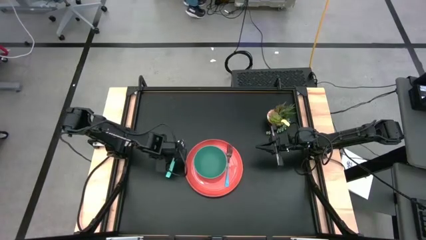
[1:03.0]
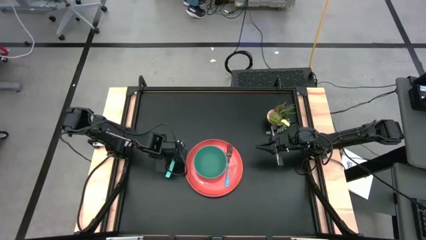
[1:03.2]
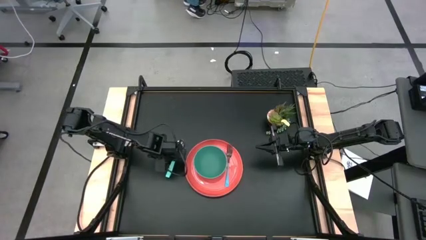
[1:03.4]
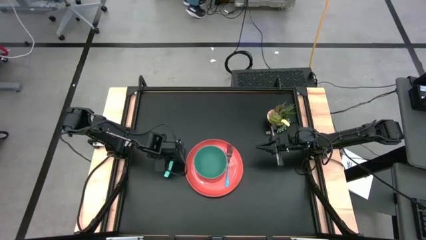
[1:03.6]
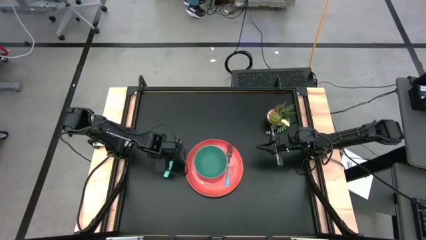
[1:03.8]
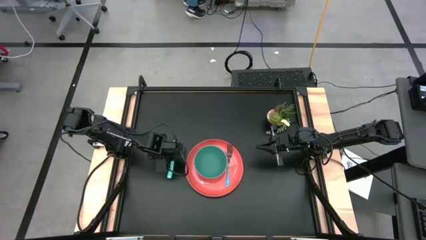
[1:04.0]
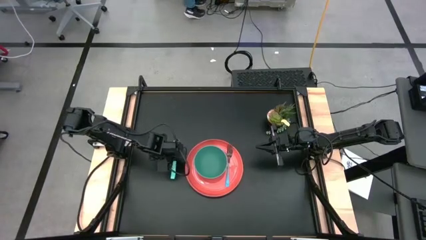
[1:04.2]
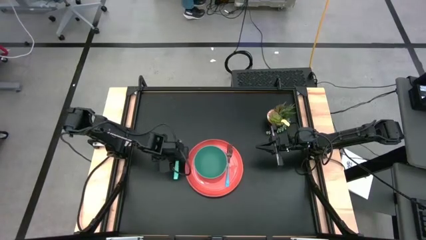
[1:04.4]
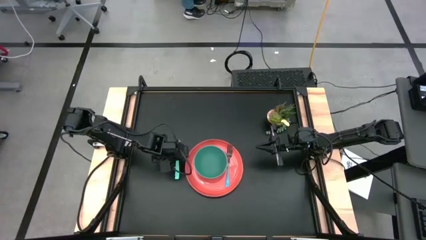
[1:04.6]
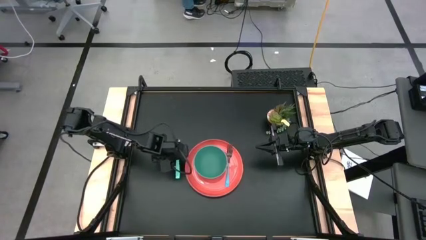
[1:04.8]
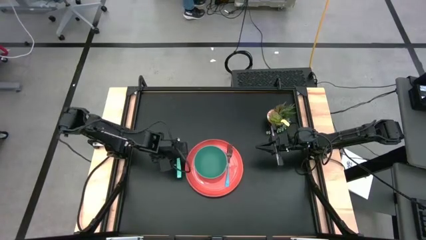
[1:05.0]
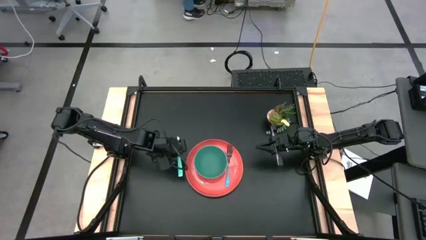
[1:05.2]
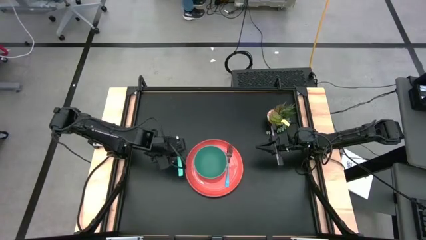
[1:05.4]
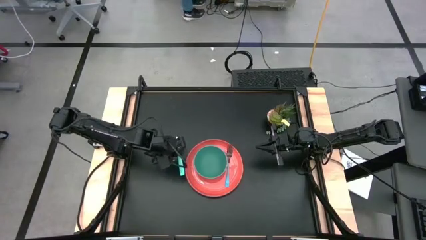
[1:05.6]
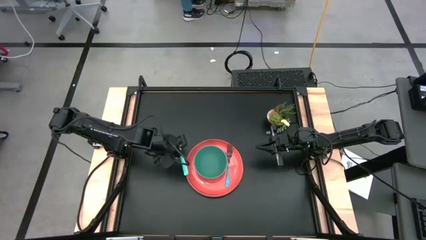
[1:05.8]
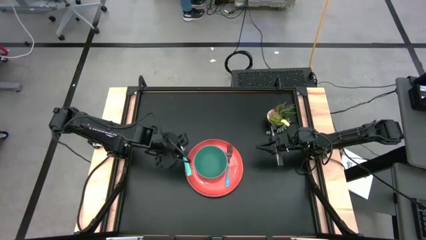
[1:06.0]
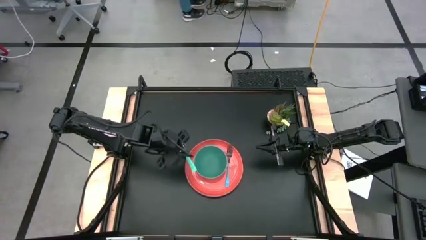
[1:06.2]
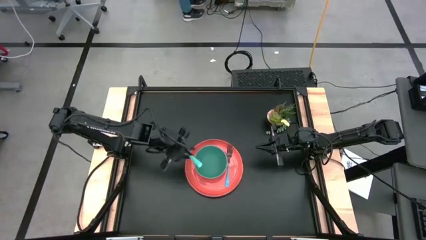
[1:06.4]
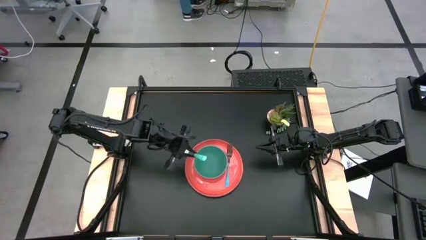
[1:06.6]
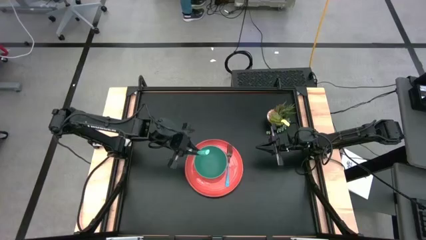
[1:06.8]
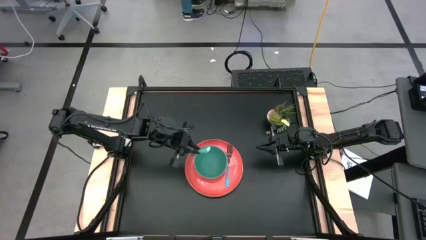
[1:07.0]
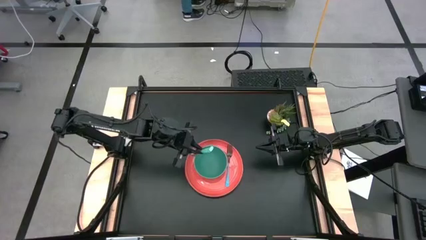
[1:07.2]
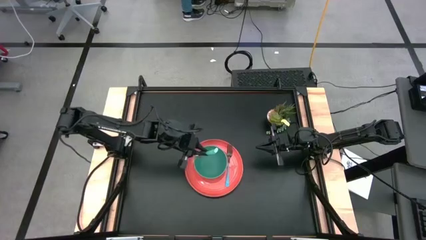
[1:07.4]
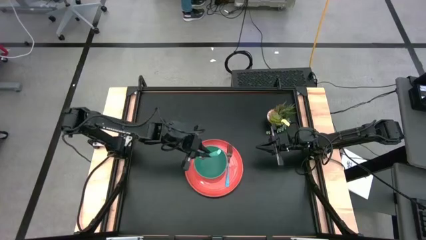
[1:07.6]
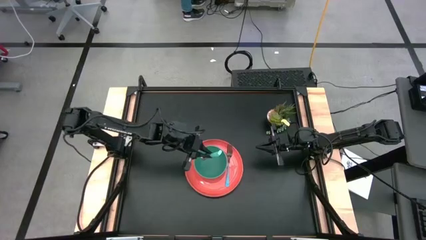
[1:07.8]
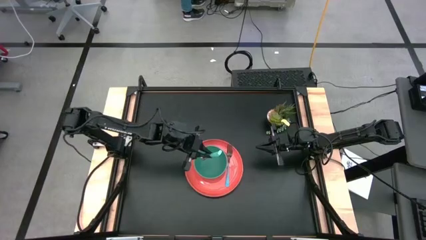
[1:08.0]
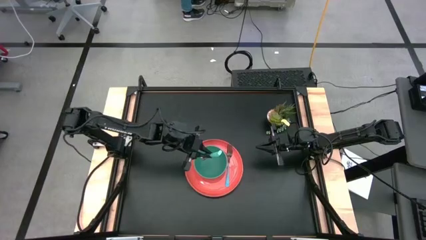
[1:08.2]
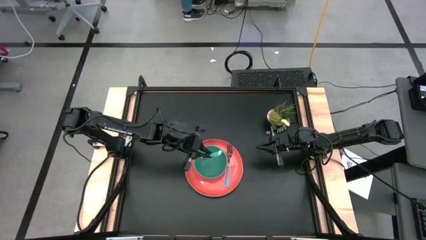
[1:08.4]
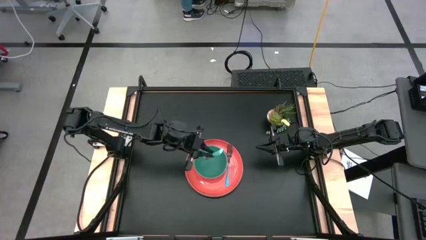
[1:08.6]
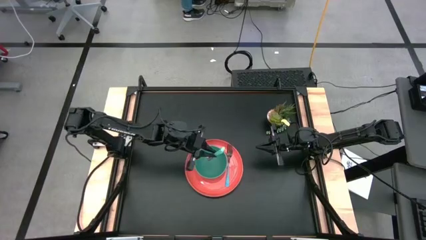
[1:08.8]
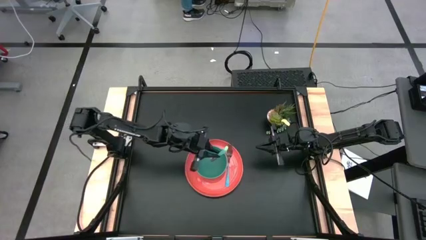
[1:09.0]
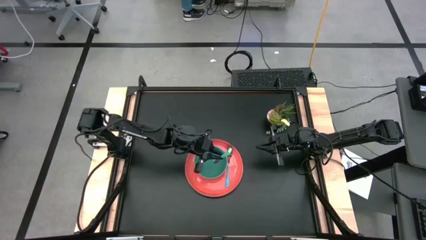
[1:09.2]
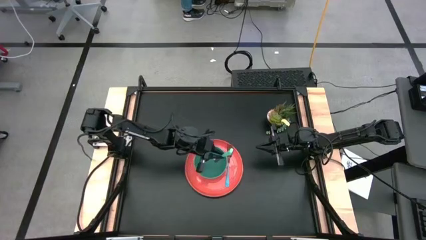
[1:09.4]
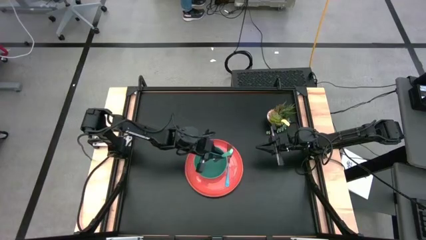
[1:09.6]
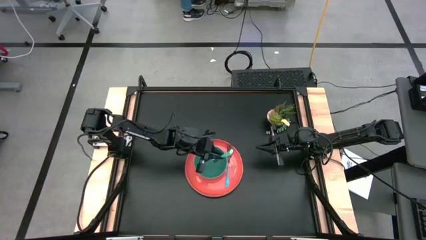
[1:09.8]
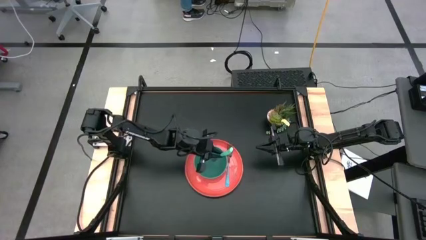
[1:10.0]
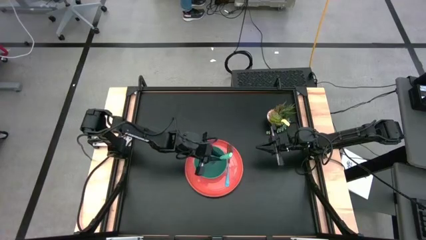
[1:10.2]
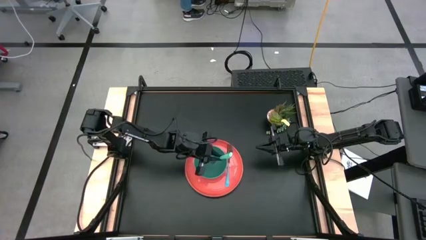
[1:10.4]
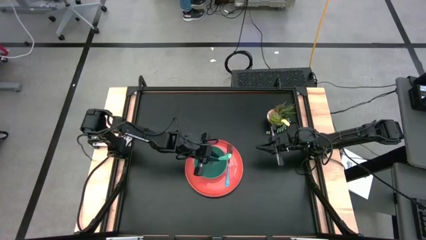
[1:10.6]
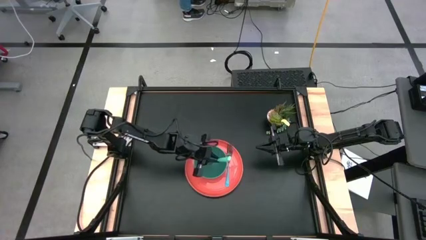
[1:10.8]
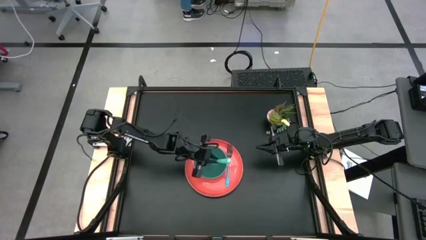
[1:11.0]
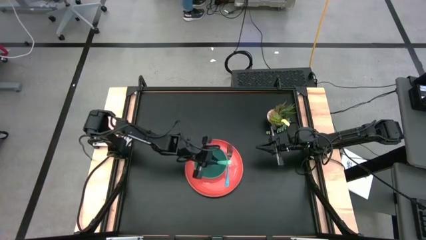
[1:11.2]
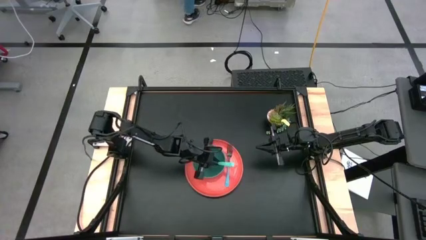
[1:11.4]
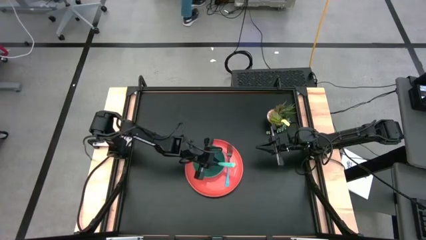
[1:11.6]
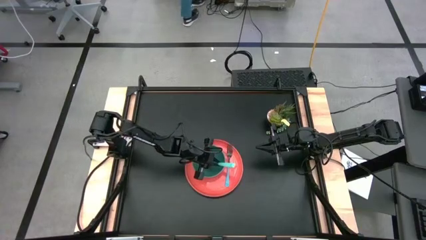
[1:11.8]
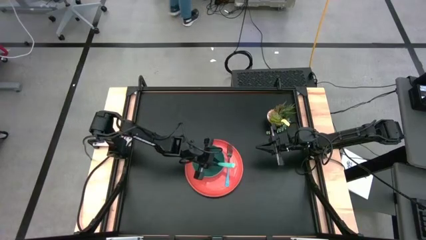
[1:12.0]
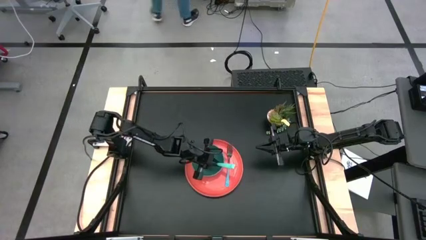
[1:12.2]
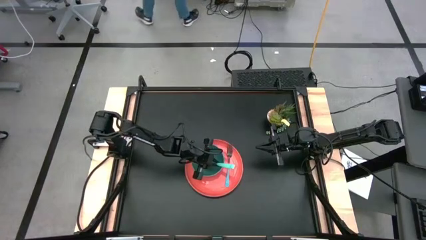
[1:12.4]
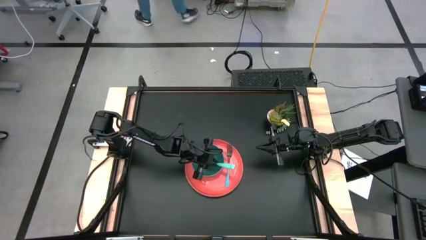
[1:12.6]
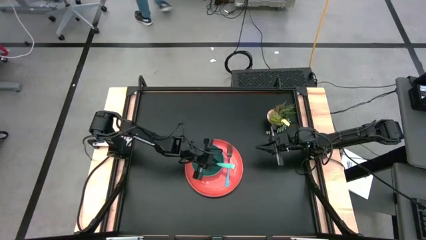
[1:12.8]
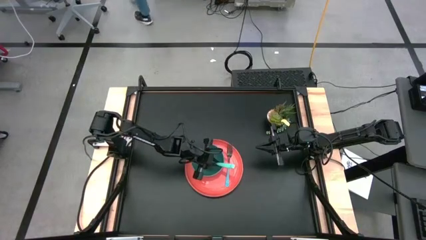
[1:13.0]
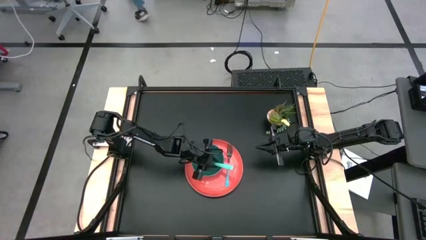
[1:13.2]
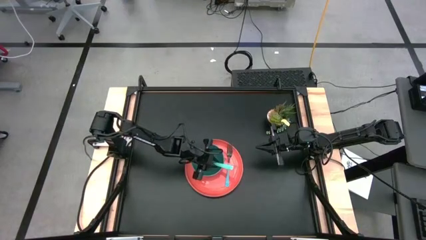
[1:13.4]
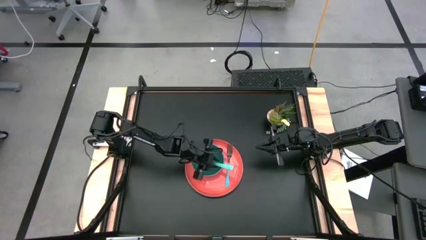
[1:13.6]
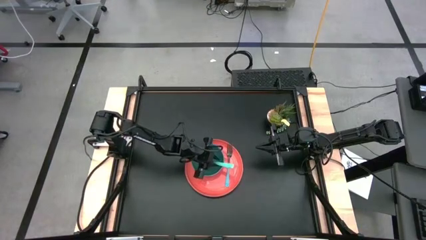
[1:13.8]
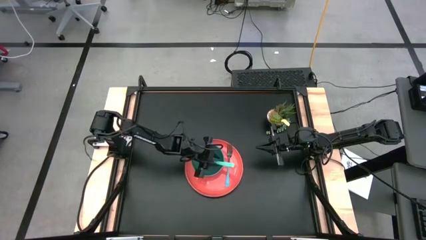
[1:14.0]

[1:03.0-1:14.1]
Task: Set table place
Put the blue spoon into the green bowl

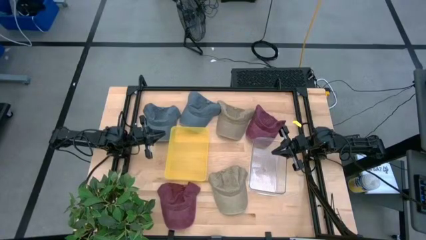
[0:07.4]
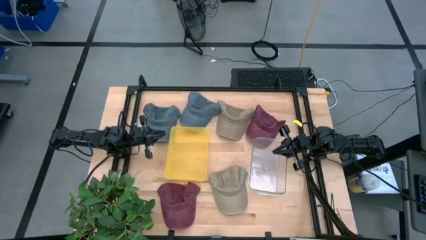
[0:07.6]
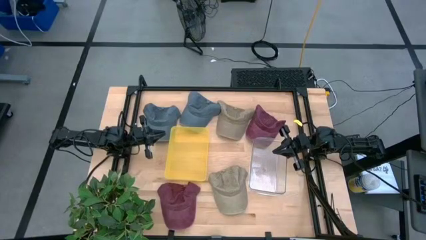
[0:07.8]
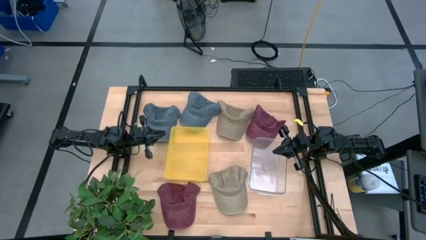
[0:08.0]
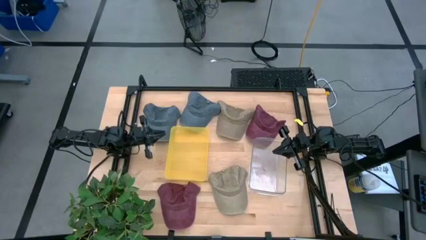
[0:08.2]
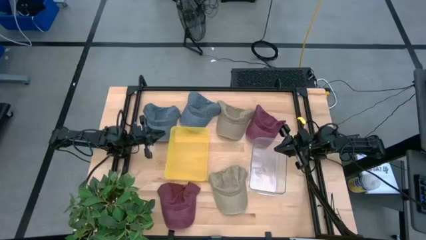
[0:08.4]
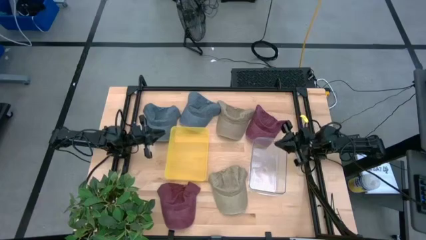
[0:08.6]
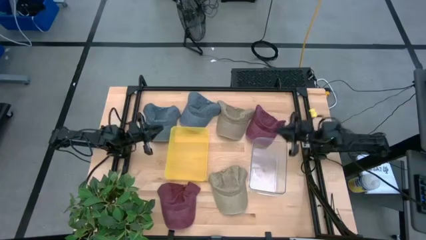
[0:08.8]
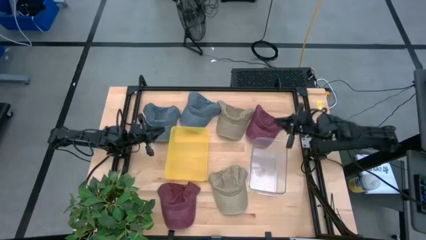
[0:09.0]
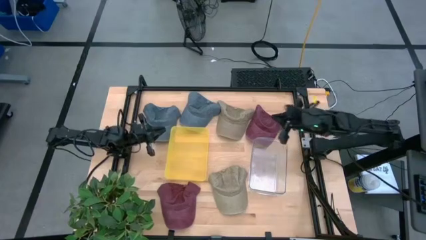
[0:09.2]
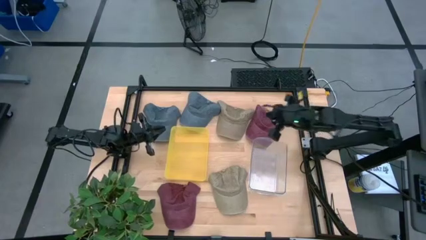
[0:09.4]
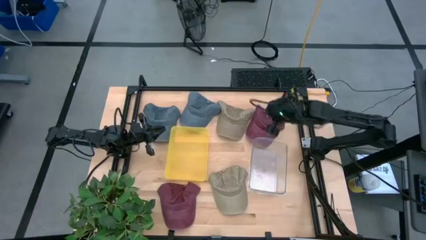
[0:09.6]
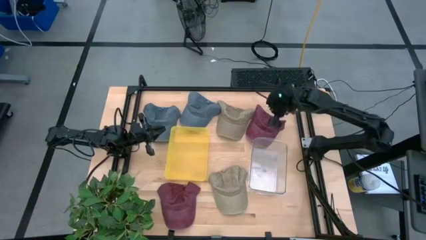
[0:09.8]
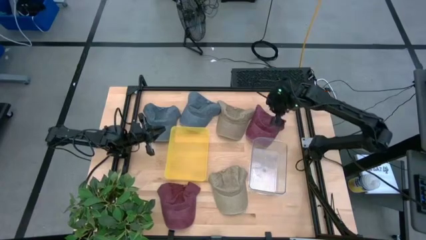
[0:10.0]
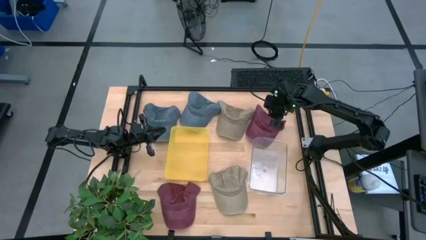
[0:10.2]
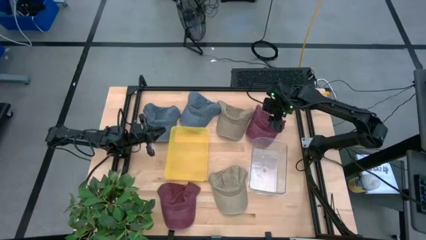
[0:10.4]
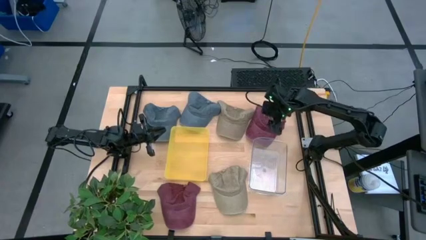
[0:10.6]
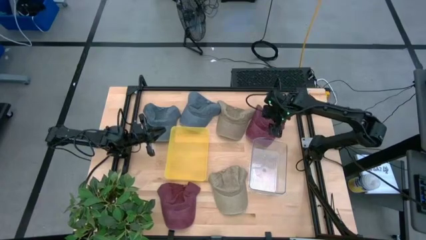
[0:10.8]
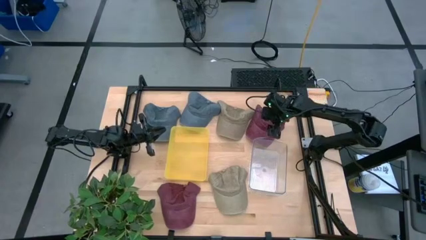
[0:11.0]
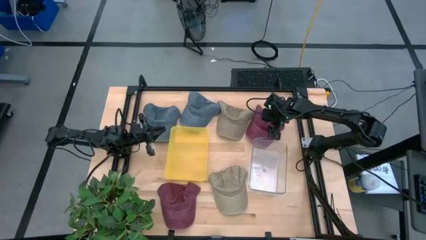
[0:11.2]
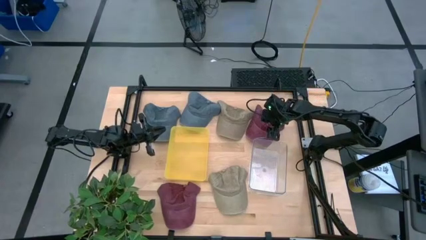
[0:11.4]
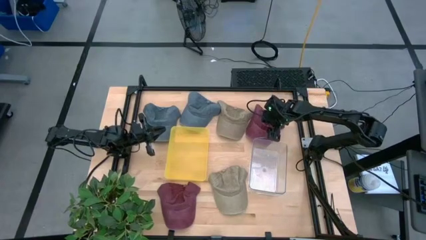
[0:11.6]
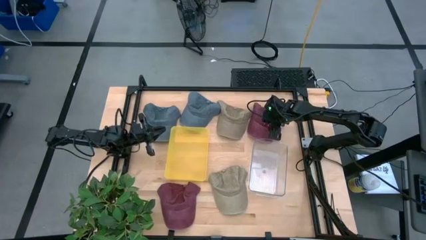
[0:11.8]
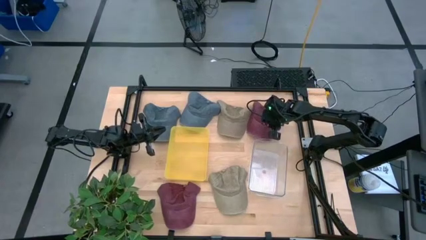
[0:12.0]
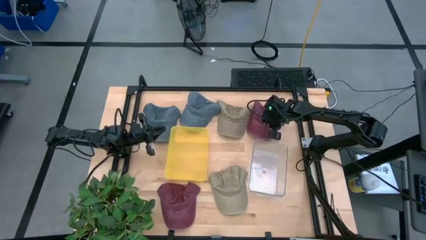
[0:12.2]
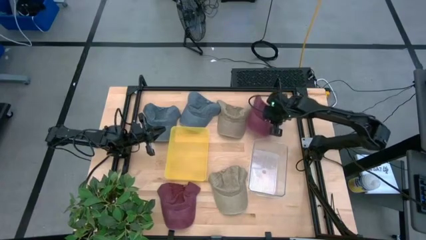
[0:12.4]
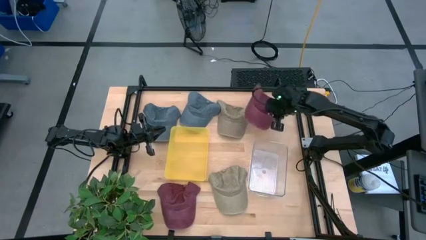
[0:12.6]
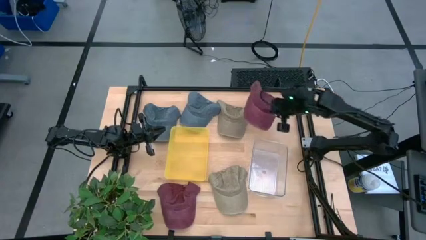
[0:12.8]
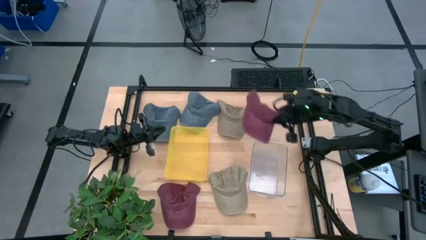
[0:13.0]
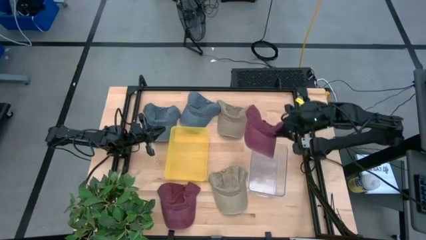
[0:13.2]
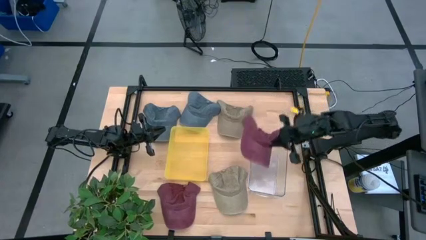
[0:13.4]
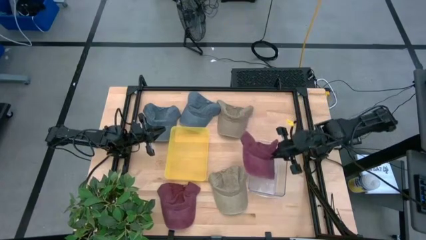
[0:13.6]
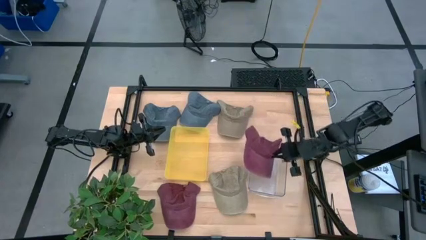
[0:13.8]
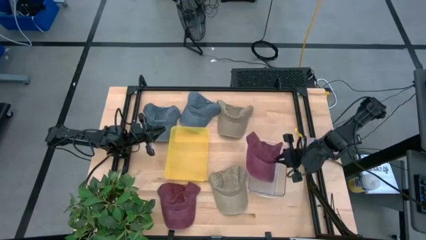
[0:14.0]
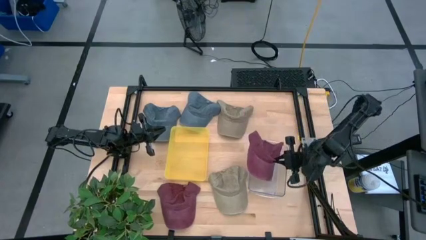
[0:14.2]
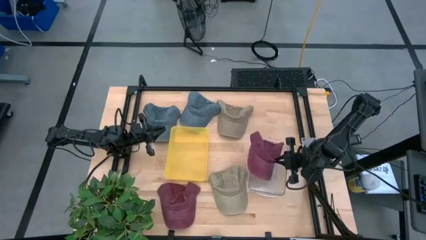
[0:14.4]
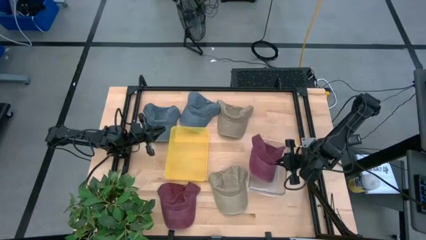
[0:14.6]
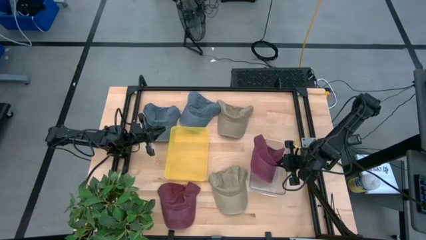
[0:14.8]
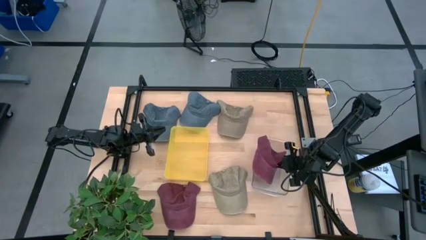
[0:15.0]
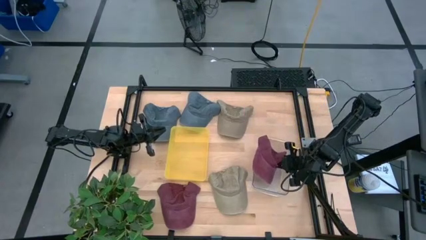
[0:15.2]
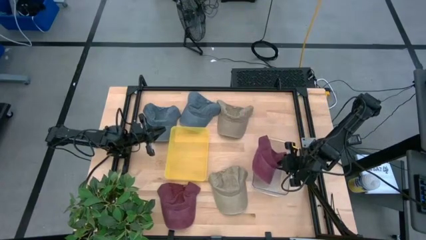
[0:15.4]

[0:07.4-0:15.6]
Task: Pick & Place hat
Put the top red cap into the transparent bin
